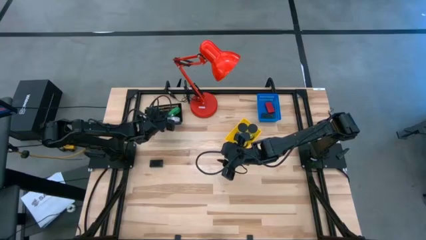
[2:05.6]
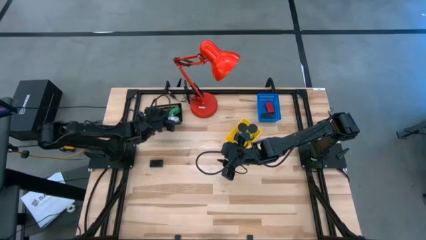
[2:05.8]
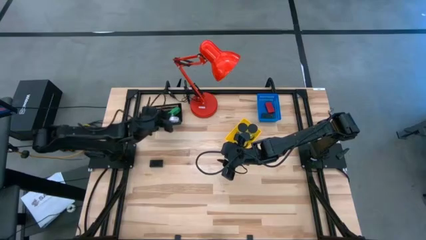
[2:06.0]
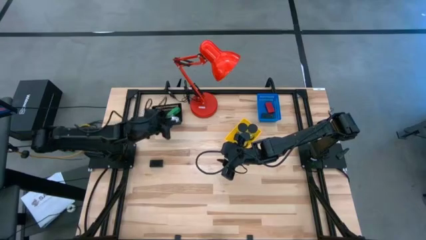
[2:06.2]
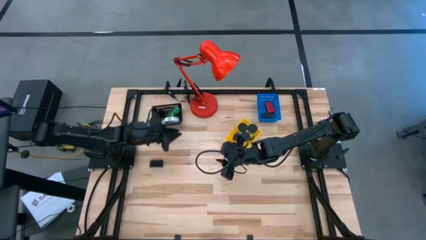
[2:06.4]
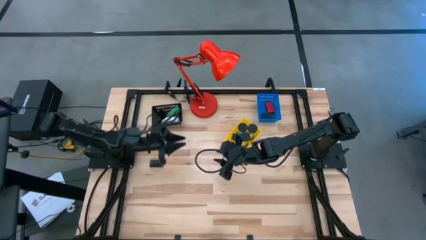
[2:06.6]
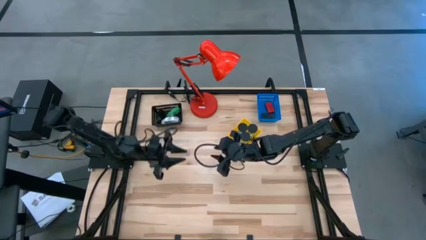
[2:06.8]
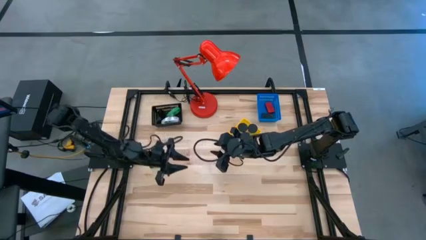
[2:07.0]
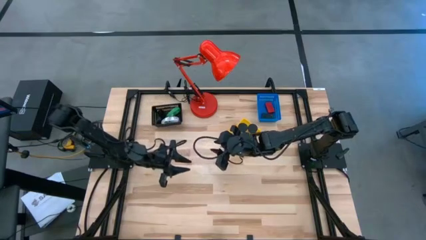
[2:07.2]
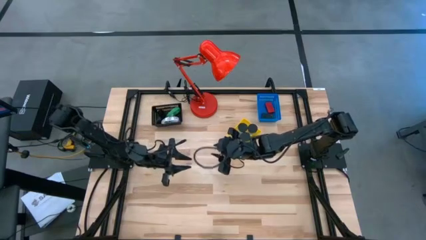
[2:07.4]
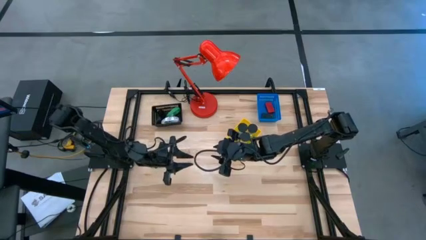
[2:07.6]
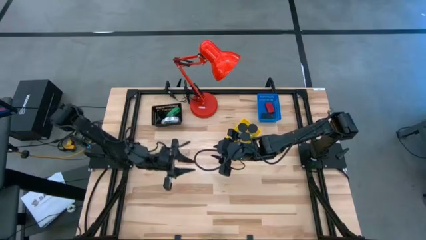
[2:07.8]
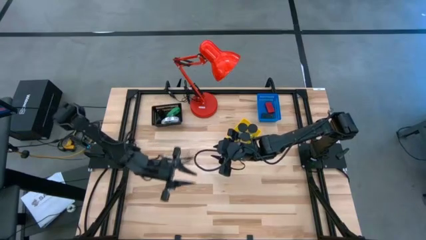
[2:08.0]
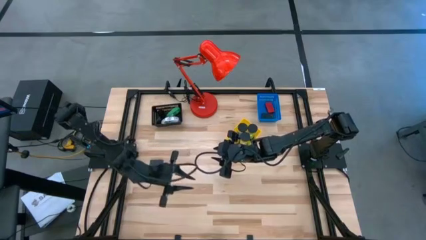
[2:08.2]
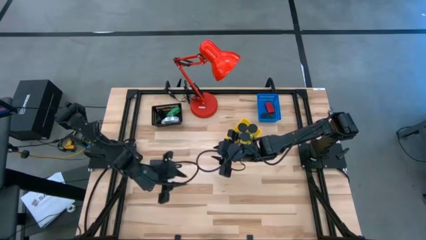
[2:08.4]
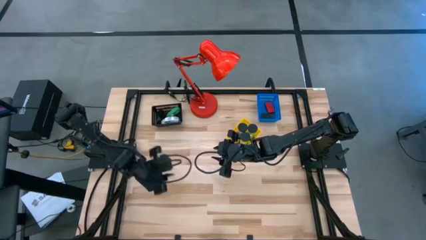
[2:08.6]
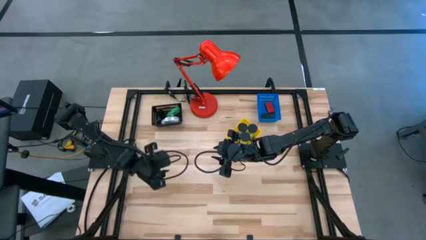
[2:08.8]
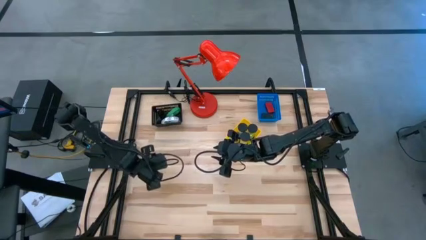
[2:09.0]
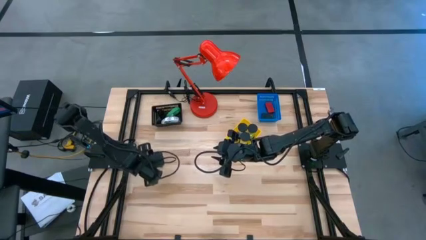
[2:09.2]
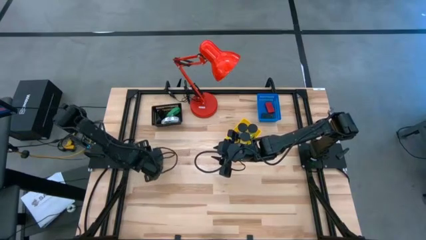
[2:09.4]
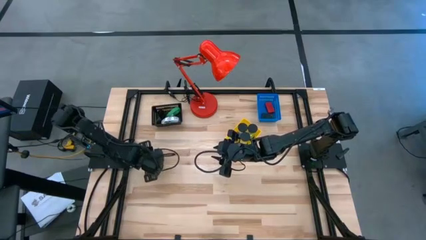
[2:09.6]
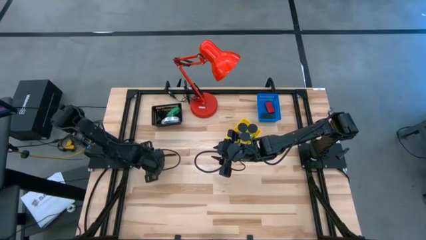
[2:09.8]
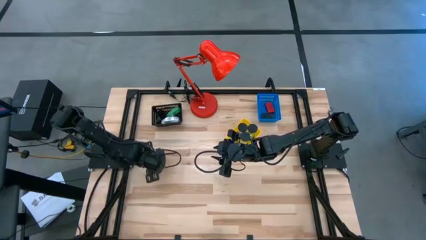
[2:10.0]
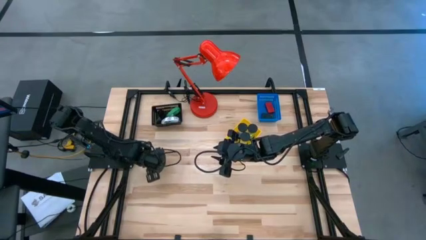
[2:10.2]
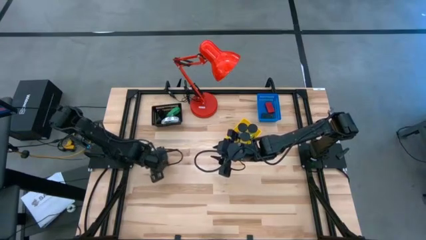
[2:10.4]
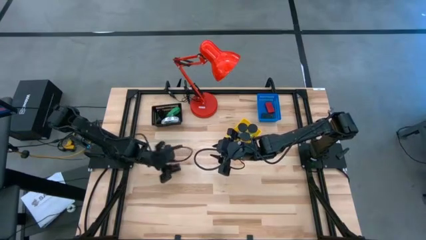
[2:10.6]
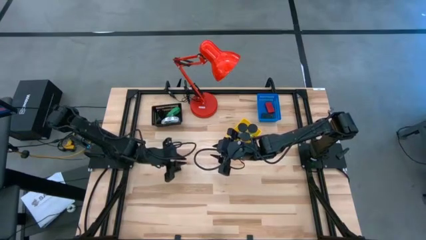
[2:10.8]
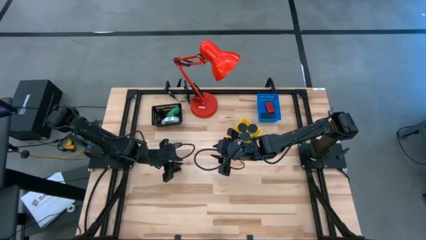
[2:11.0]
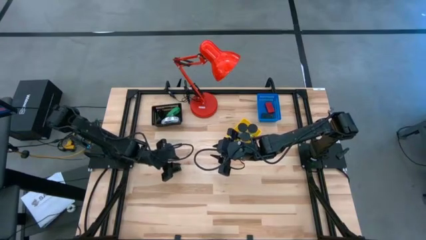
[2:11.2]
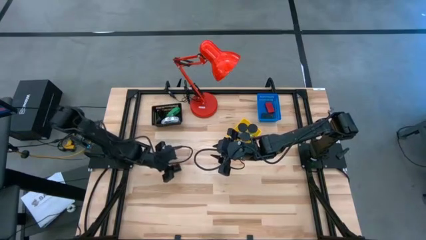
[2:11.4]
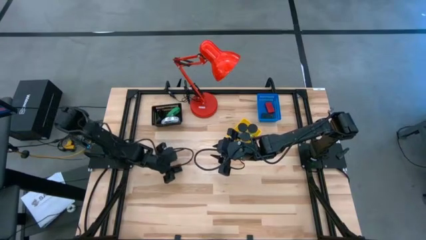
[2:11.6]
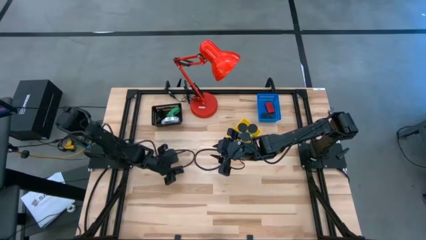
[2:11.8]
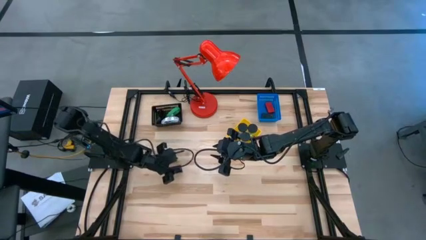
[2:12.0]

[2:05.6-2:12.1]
Task: Pick & Place Office items
Put the black digital clock into the blue bin

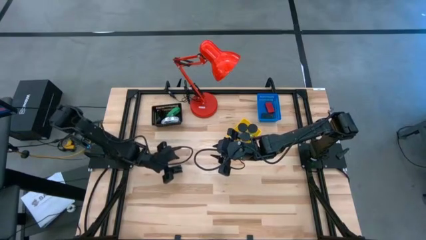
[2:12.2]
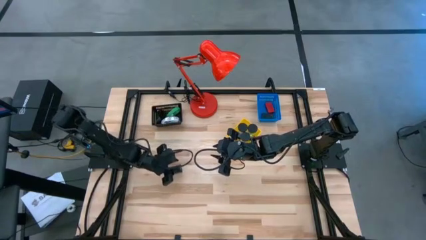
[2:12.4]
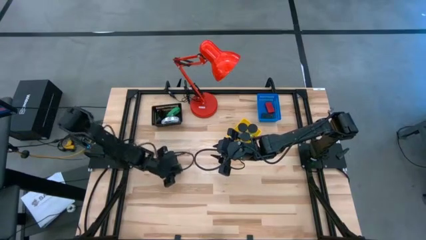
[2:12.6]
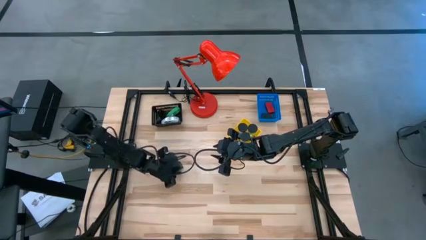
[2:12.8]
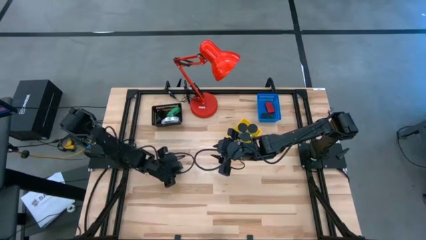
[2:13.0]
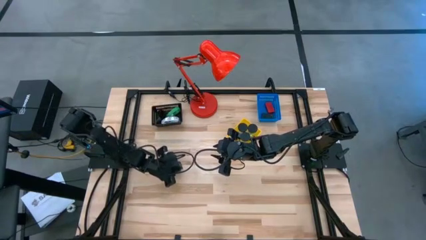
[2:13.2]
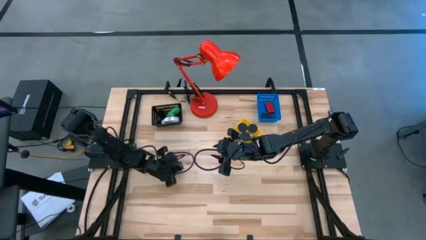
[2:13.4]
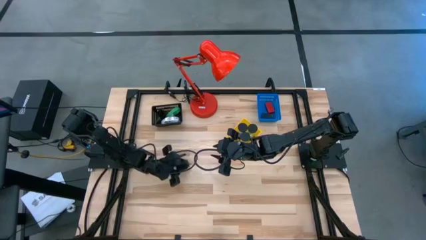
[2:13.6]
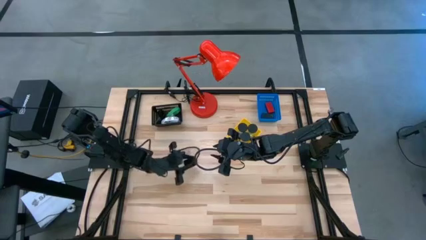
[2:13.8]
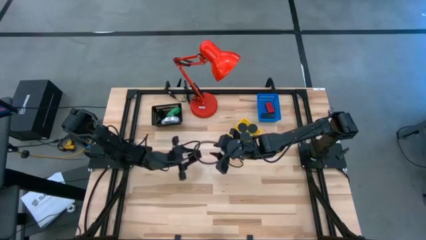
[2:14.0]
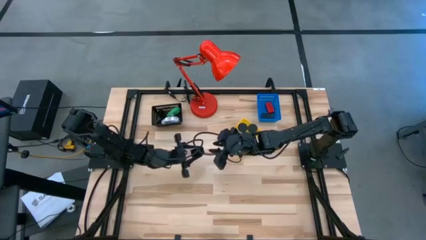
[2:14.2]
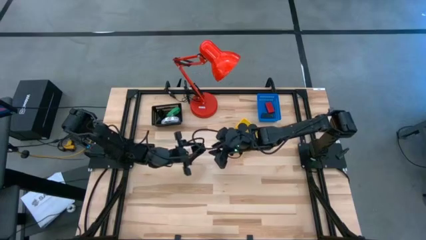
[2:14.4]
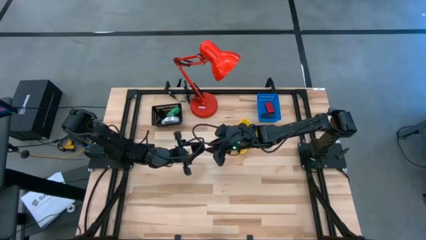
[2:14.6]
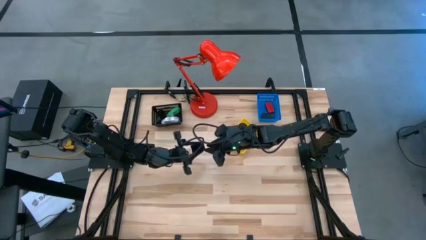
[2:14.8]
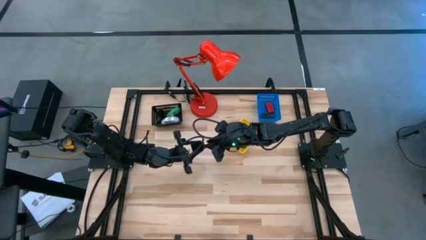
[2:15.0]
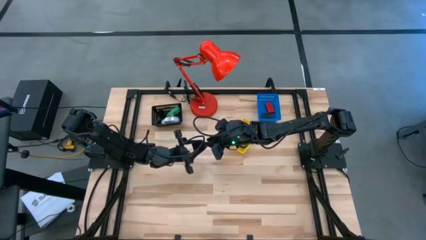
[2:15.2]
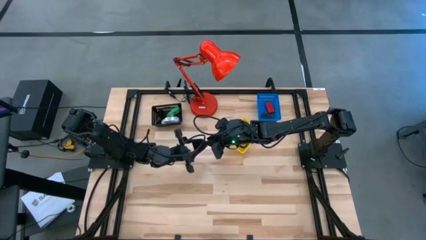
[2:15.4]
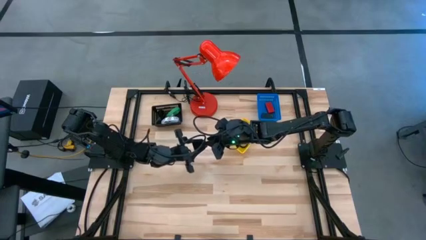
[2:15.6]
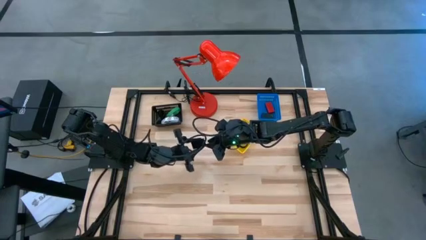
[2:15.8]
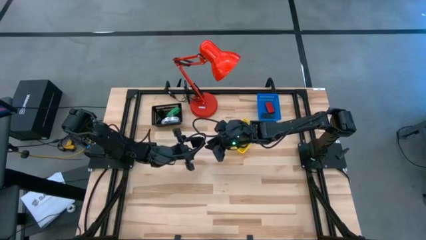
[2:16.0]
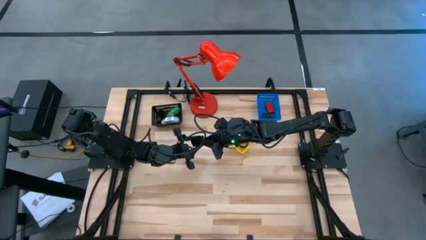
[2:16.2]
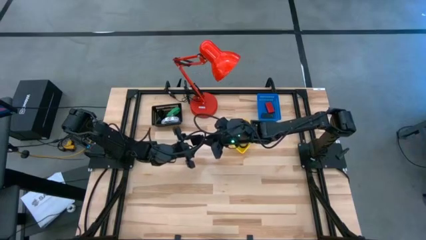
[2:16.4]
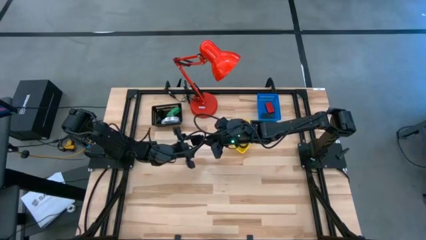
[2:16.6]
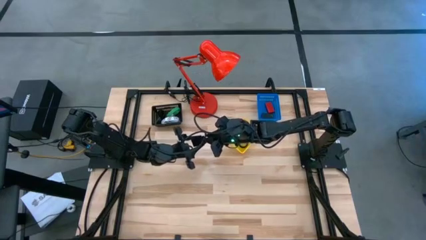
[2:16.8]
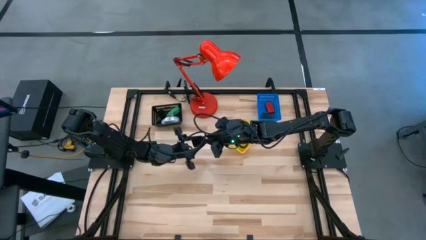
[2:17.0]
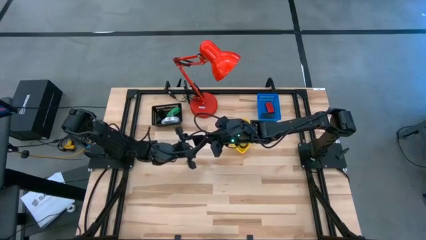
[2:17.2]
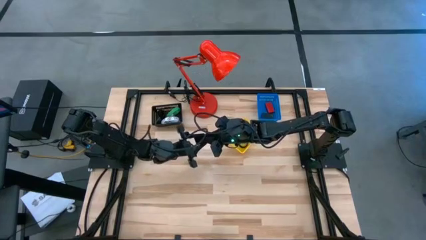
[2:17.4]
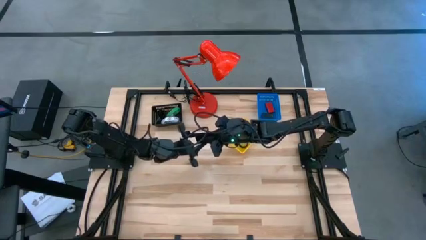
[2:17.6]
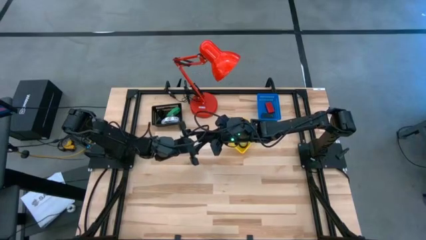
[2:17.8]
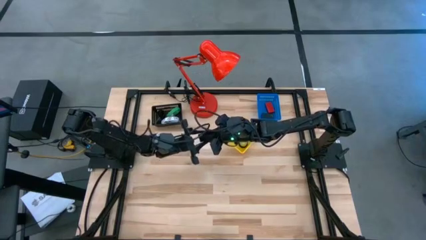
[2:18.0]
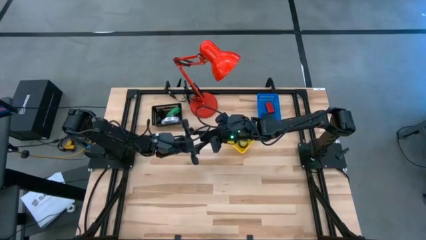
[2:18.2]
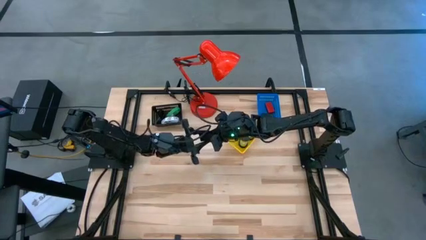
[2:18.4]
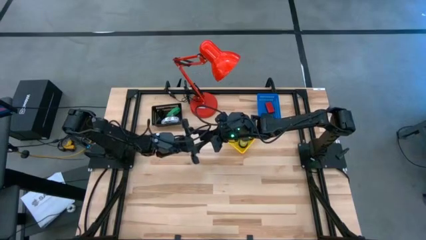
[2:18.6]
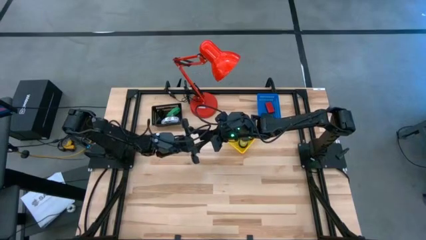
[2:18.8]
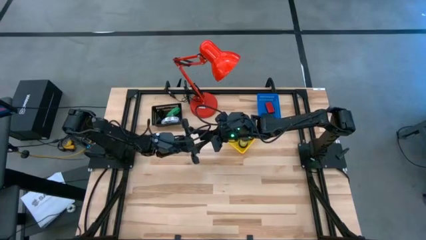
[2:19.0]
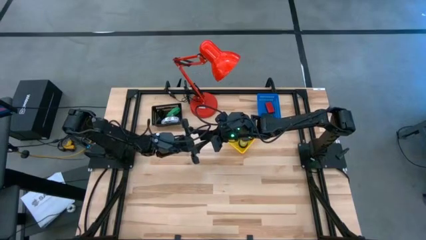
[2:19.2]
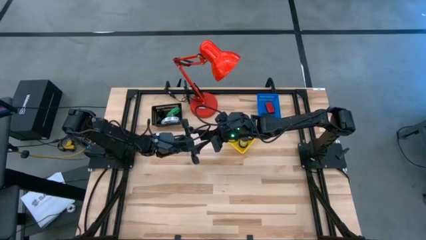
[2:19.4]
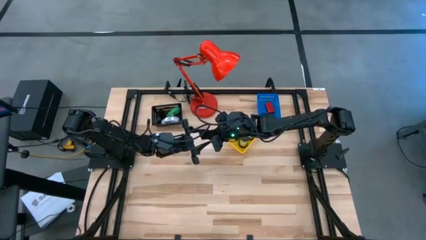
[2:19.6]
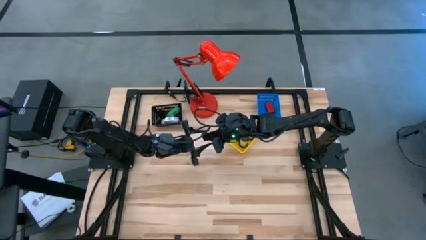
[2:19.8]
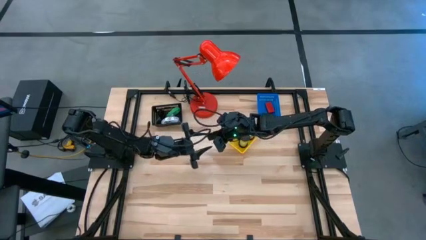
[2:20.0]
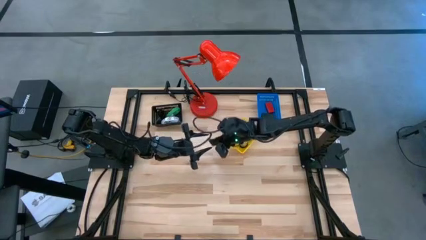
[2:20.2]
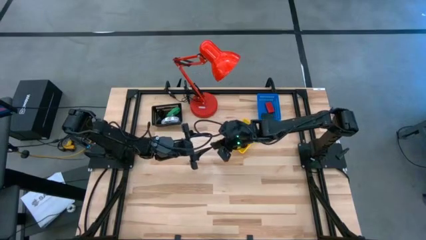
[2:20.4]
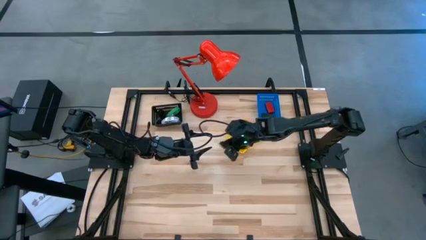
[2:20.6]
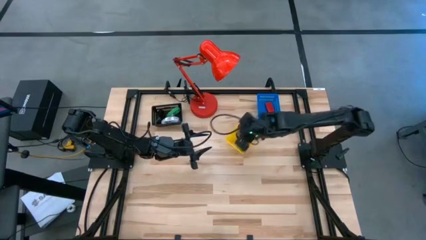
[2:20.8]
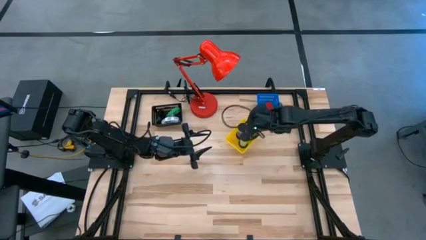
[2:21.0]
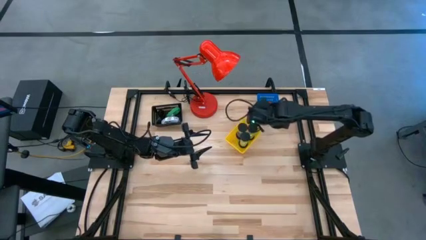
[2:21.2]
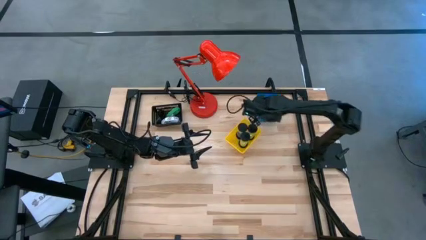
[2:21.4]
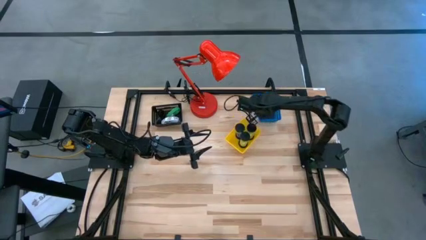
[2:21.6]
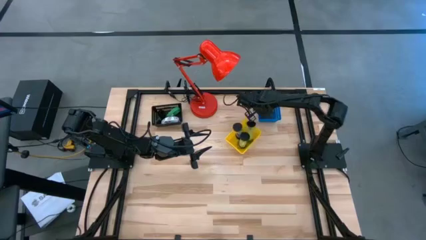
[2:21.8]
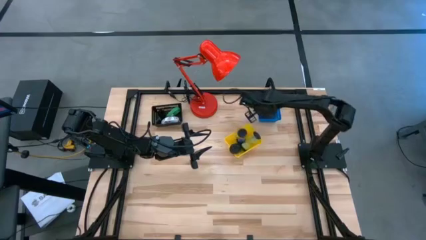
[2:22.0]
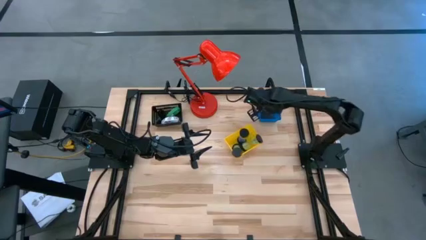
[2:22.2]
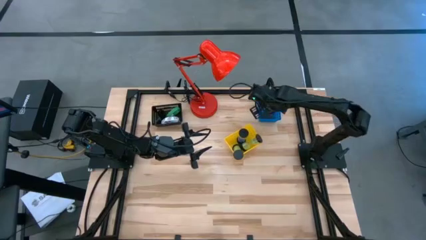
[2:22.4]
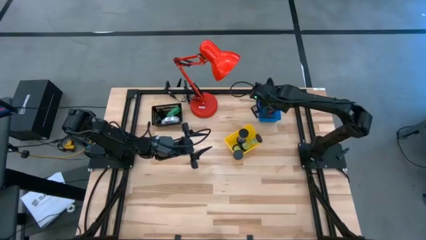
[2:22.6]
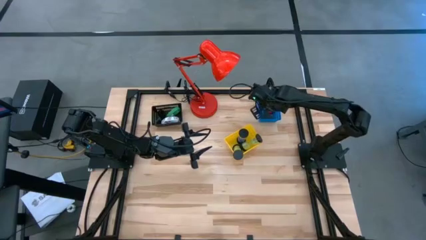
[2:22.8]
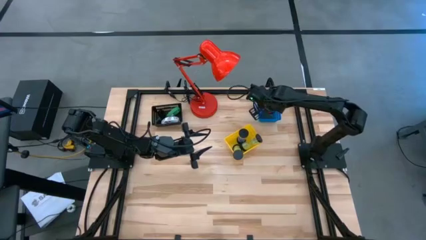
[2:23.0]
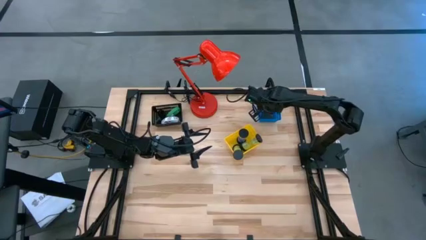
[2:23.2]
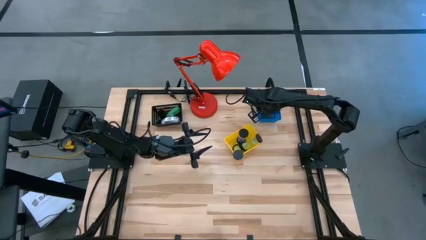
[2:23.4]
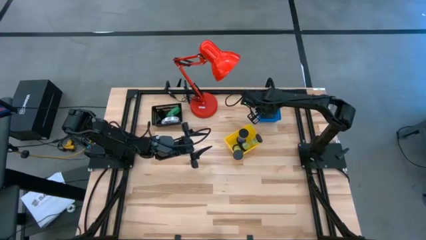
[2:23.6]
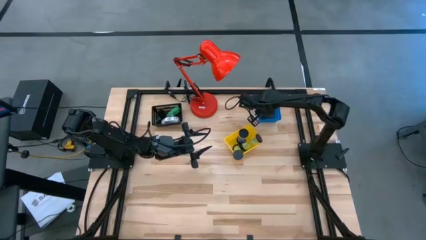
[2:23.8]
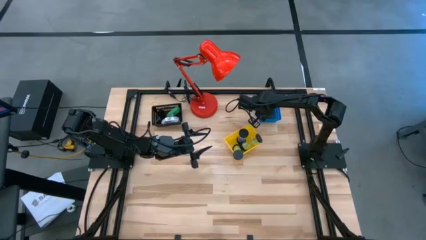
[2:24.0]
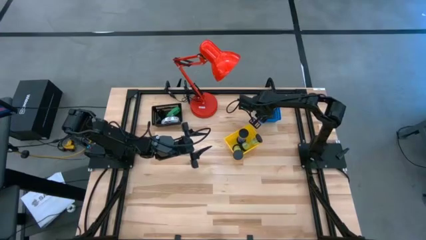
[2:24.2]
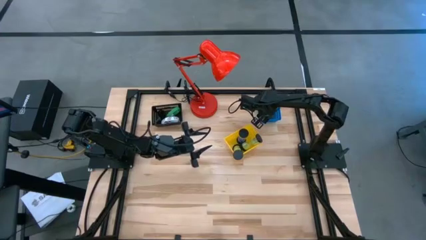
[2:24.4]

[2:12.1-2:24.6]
Put the black digital clock into the blue bin
